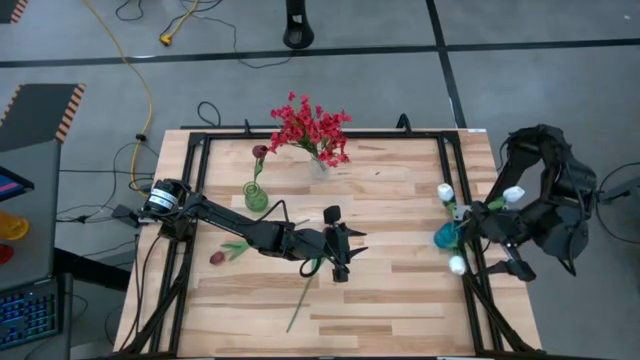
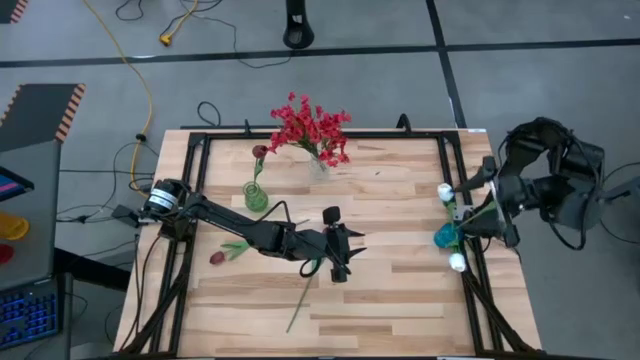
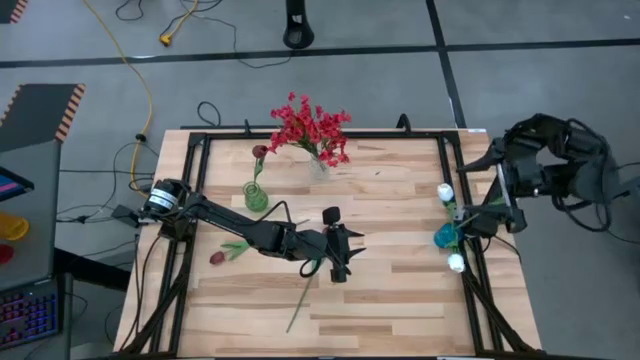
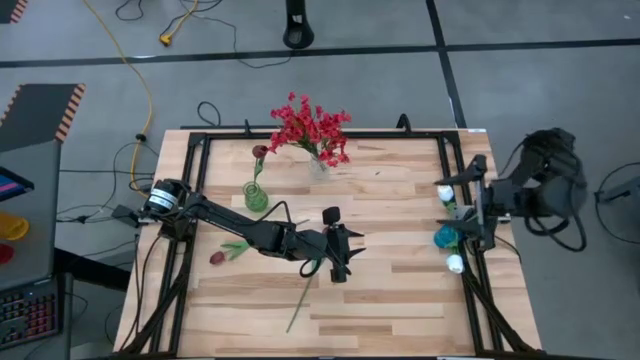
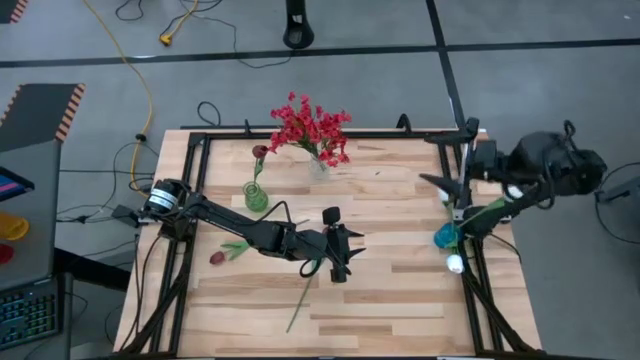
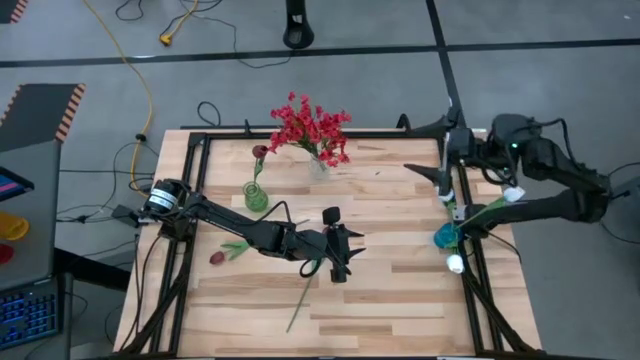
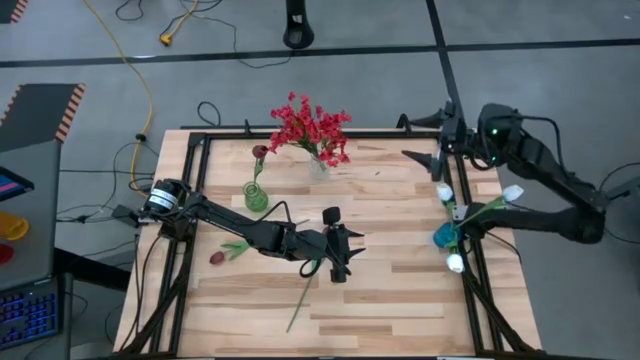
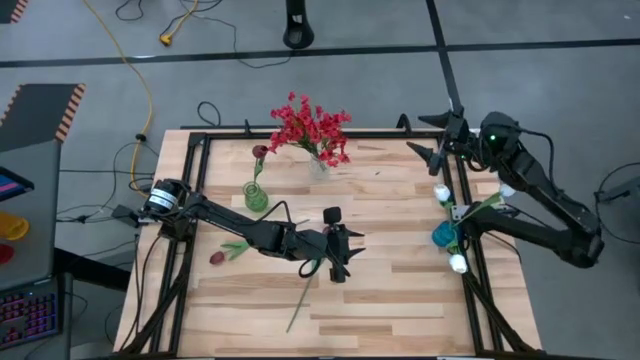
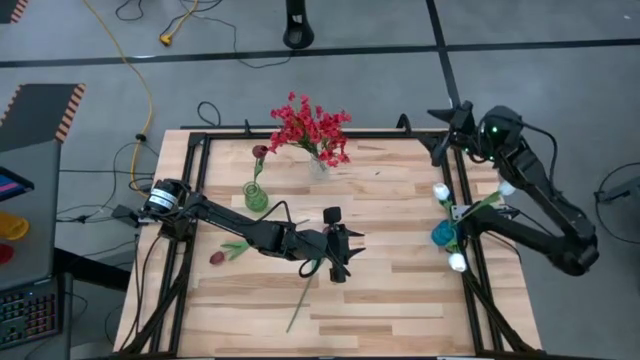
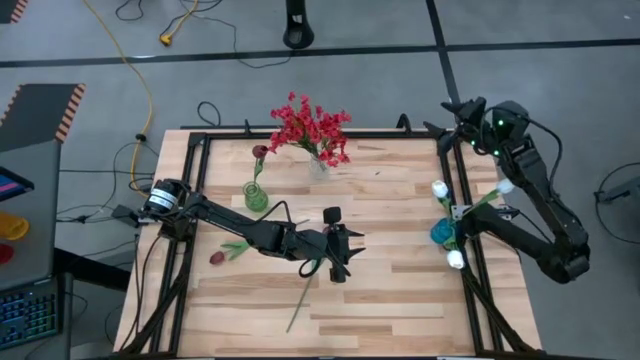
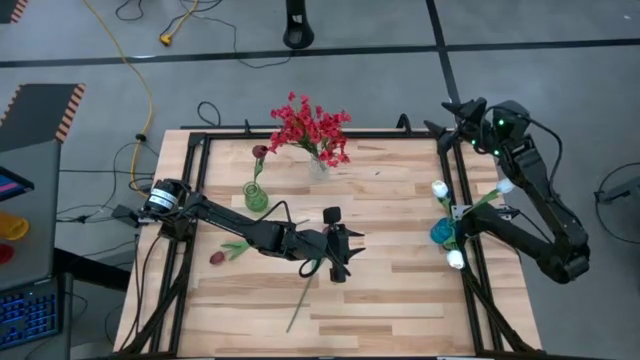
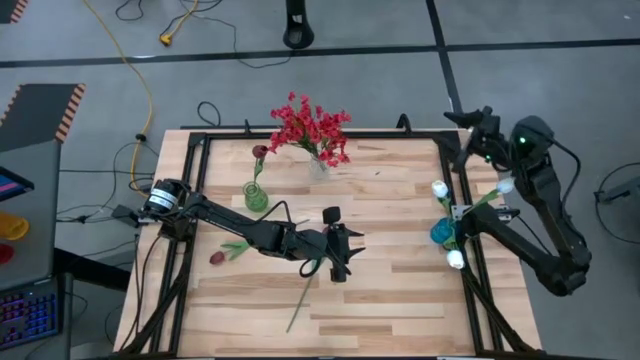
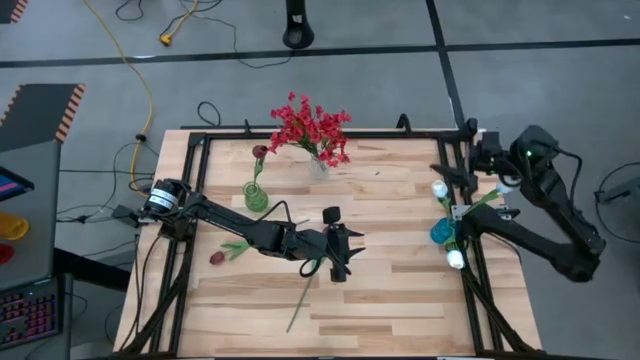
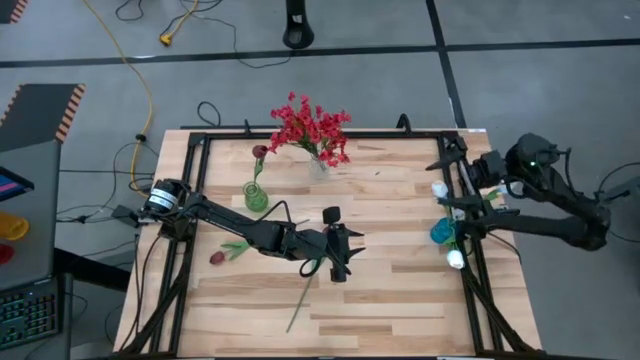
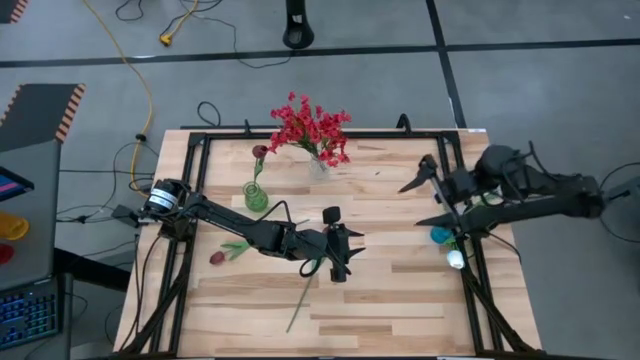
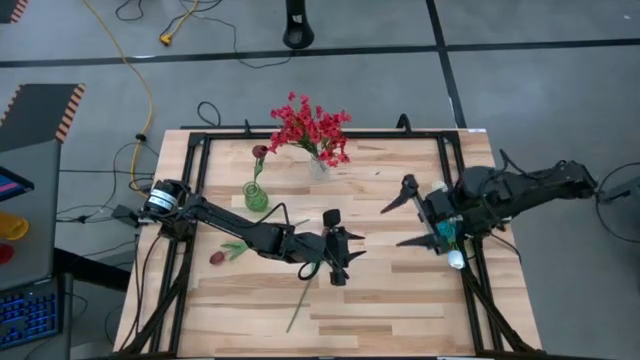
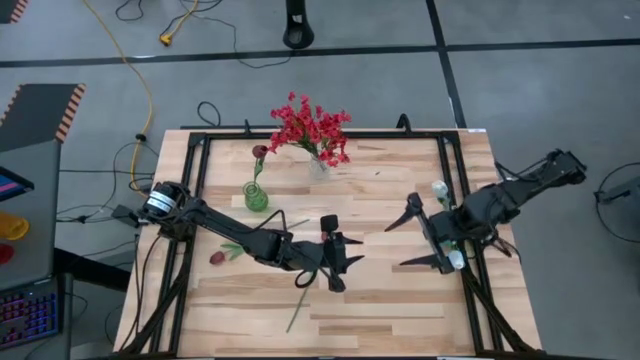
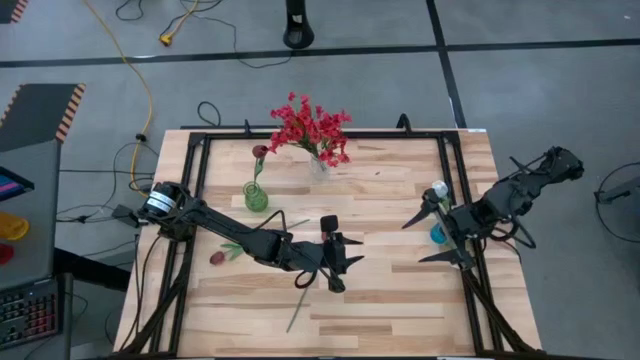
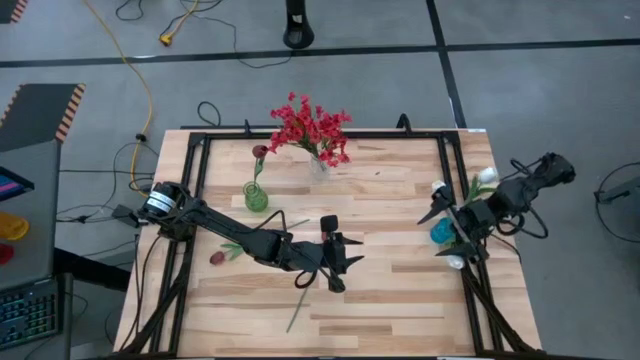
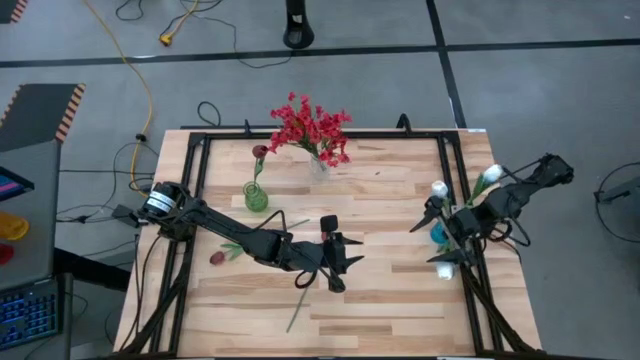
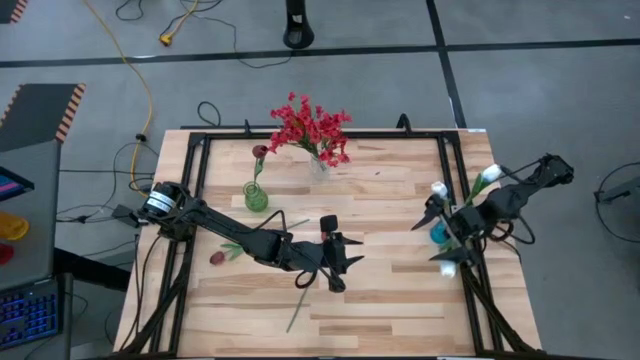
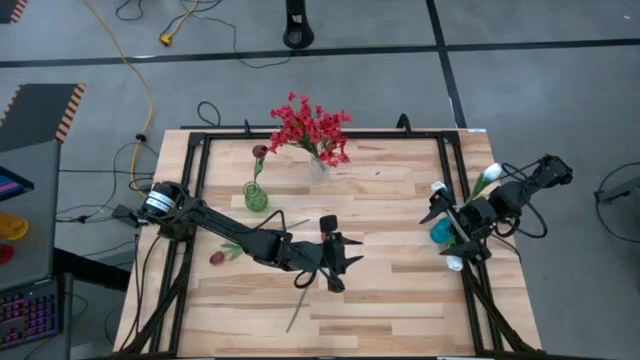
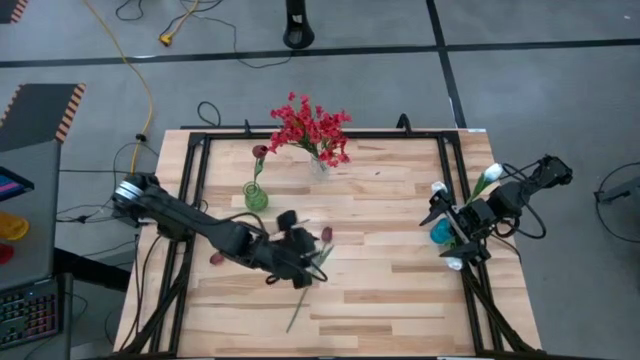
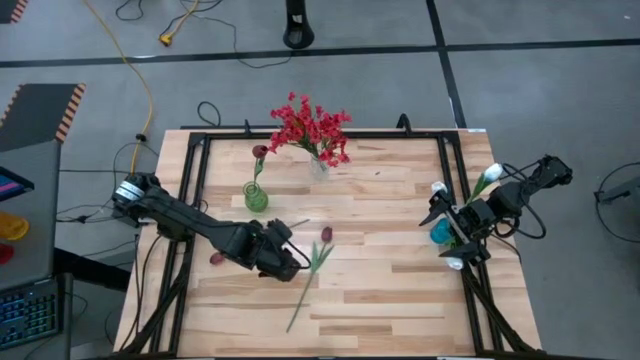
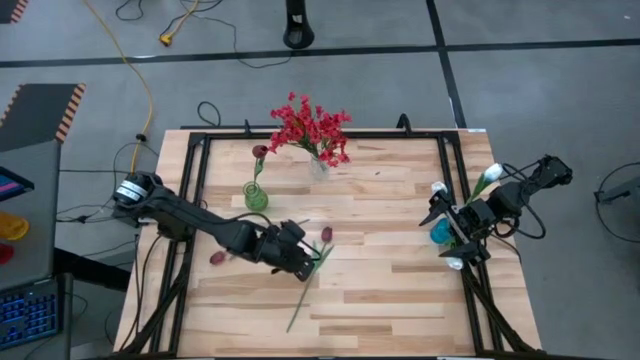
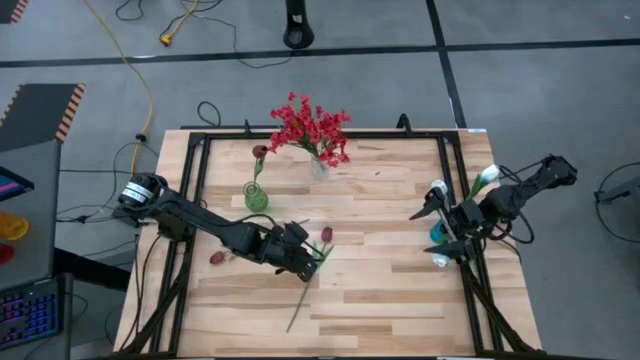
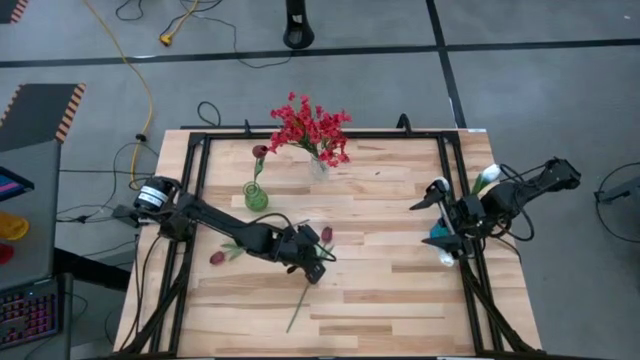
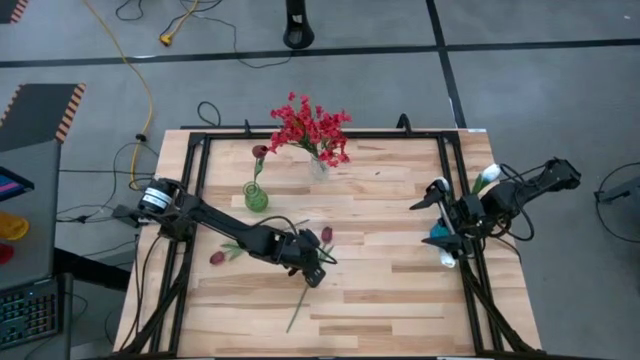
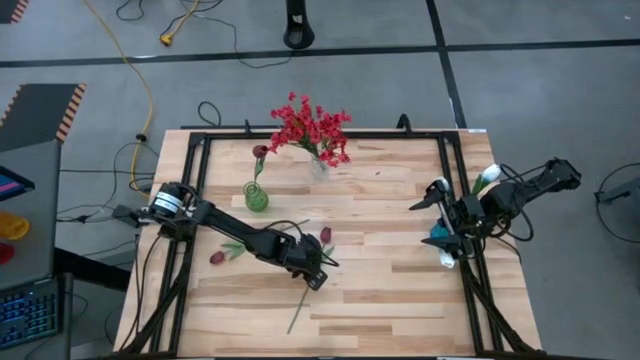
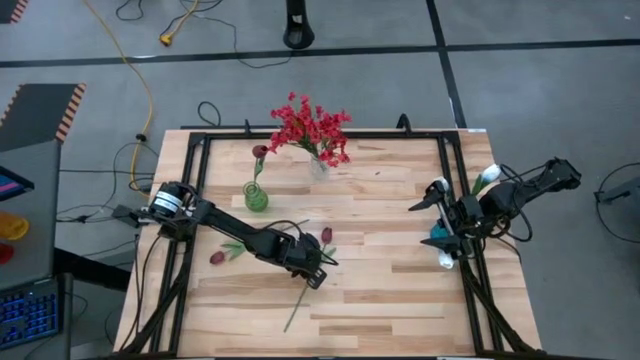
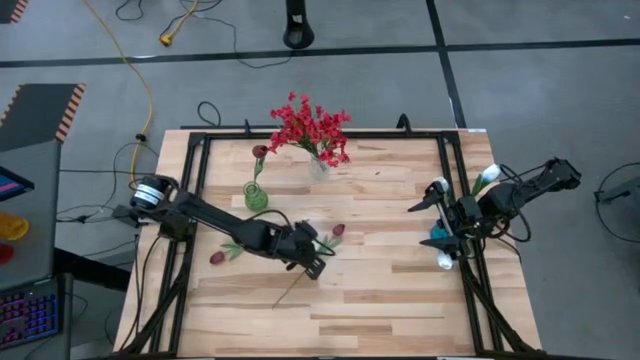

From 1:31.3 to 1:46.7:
Task: Sort flowers into vase by color
Put the right dark red tulip into the green vase

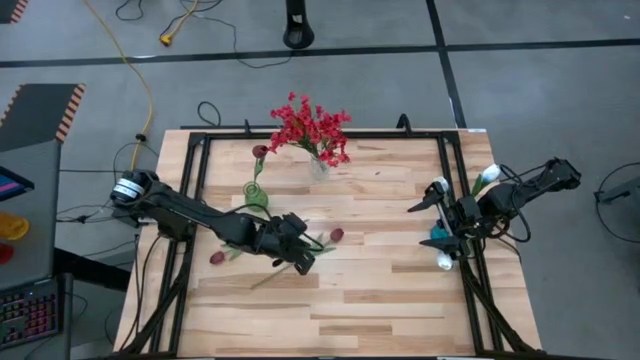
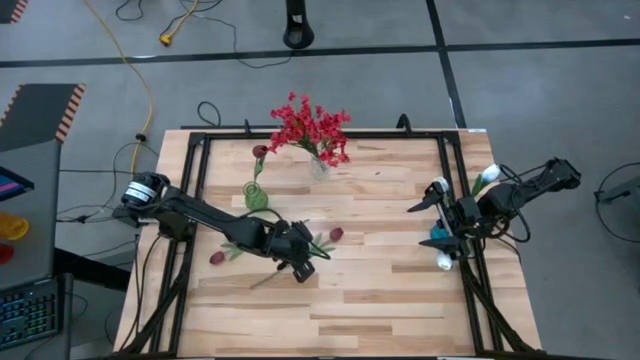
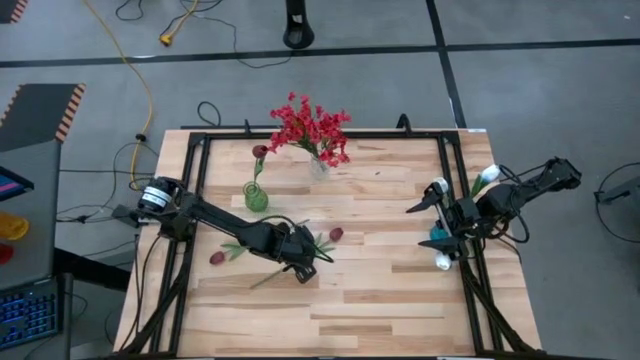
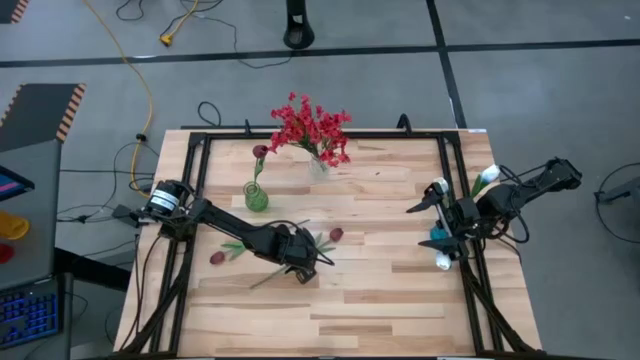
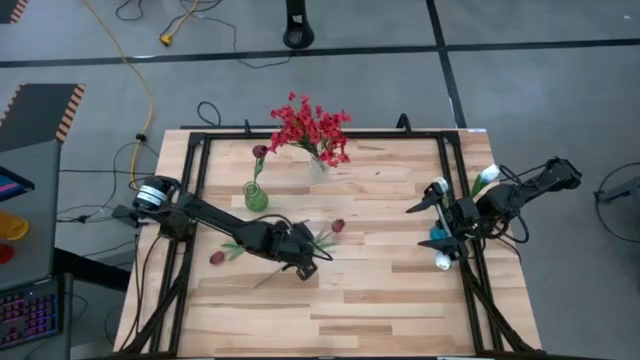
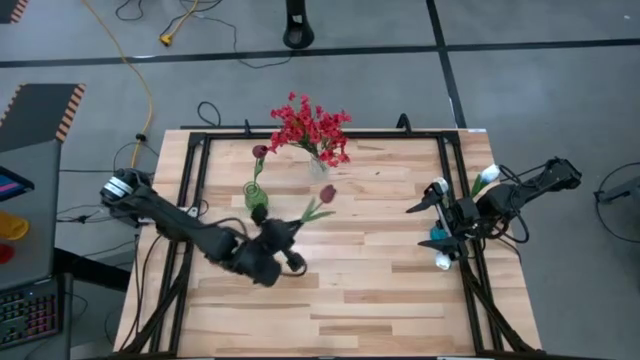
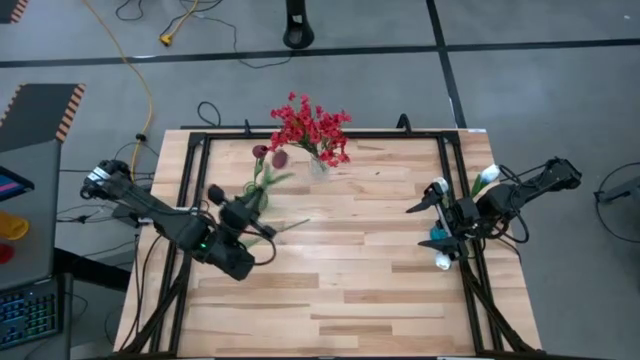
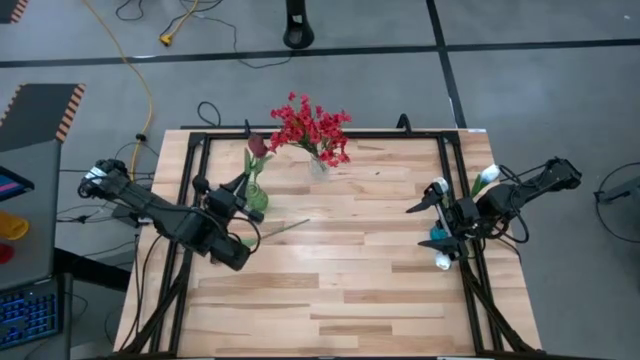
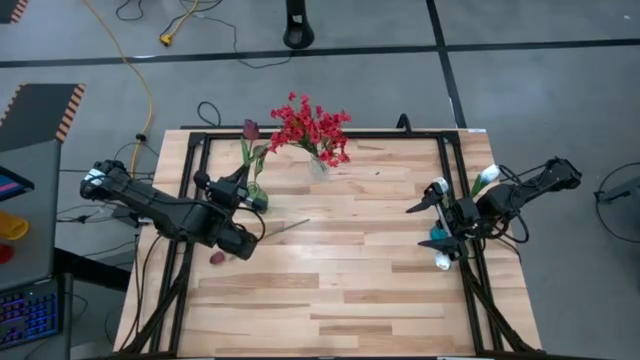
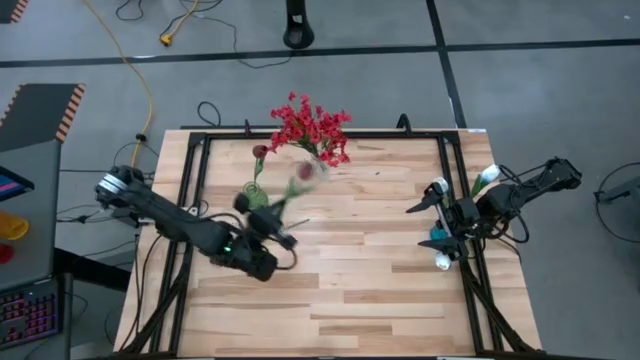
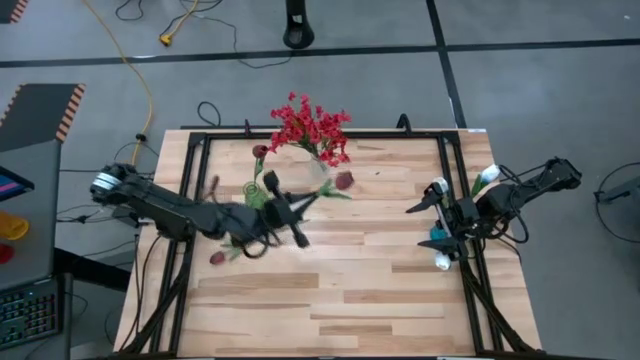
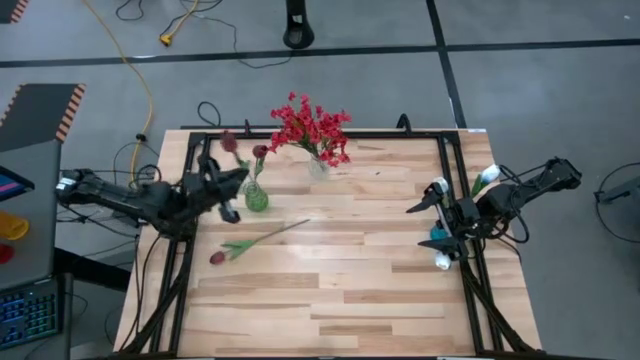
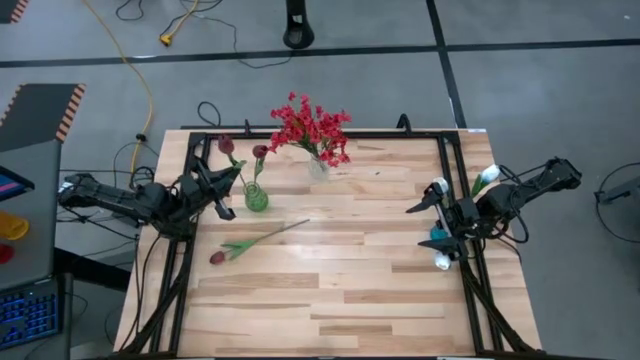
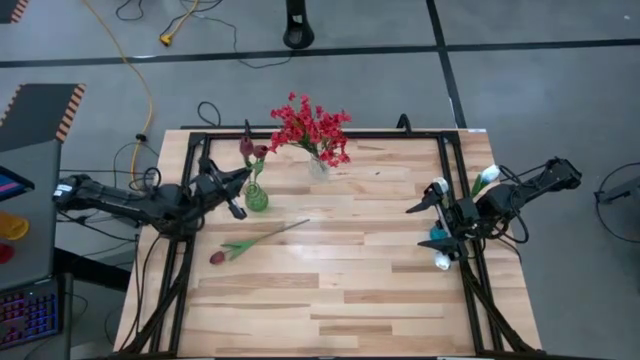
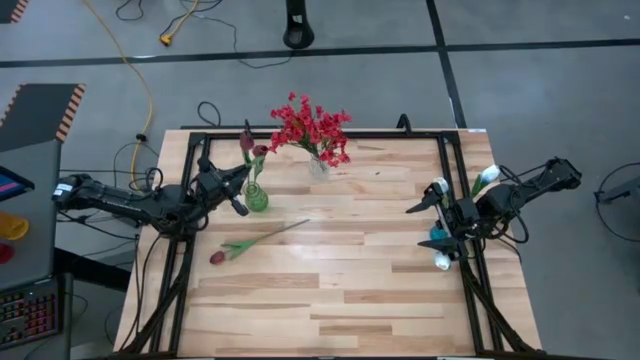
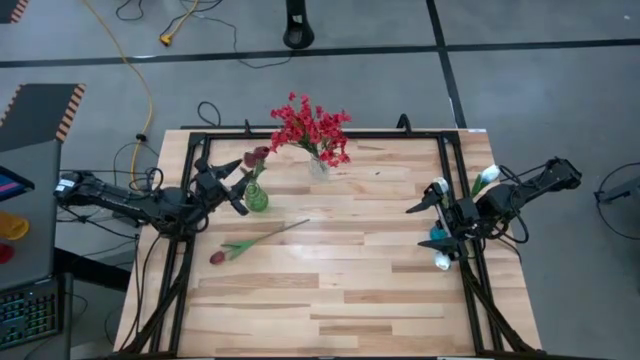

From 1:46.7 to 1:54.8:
Put the right dark red tulip into the green vase
